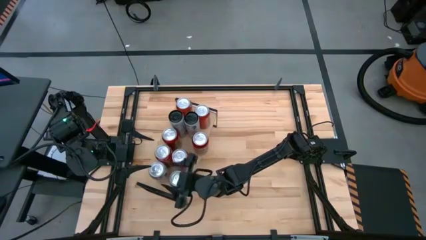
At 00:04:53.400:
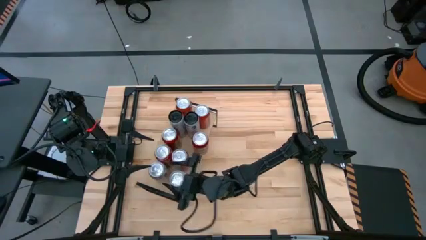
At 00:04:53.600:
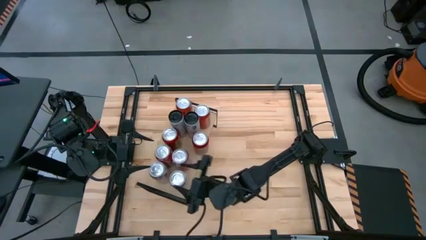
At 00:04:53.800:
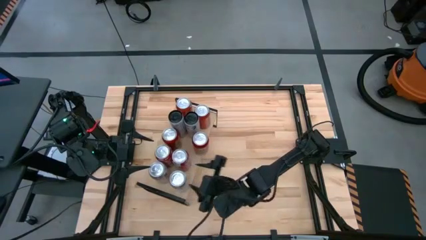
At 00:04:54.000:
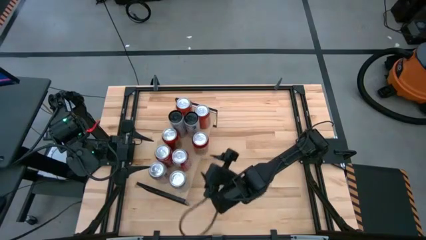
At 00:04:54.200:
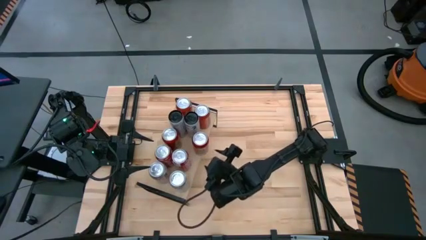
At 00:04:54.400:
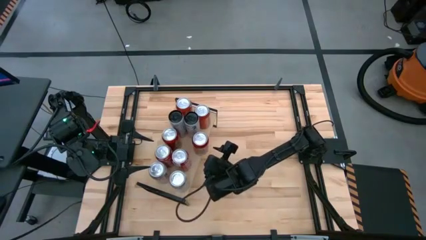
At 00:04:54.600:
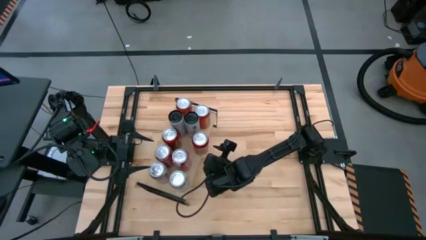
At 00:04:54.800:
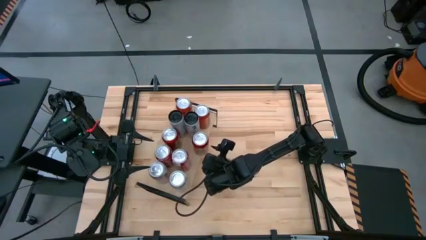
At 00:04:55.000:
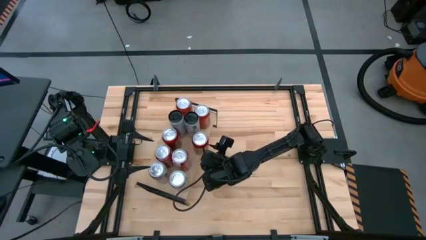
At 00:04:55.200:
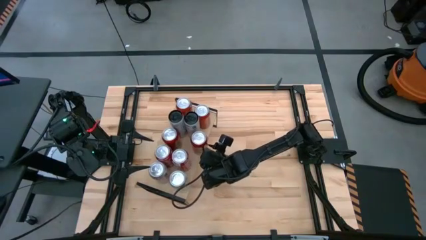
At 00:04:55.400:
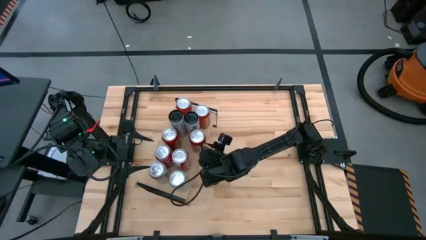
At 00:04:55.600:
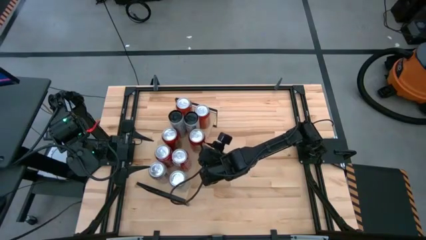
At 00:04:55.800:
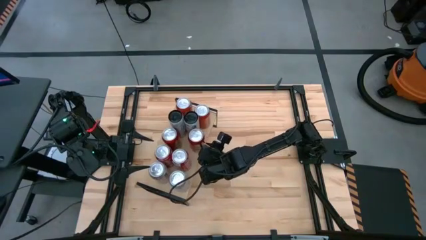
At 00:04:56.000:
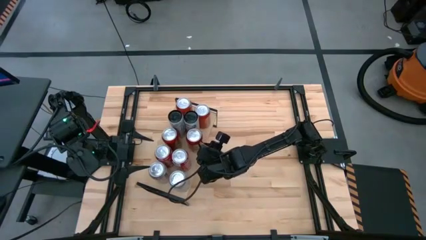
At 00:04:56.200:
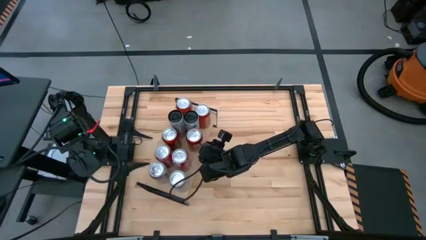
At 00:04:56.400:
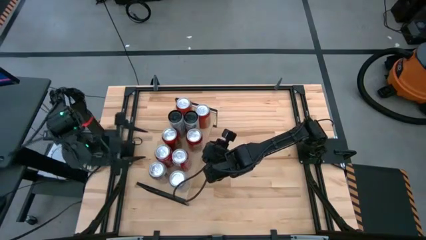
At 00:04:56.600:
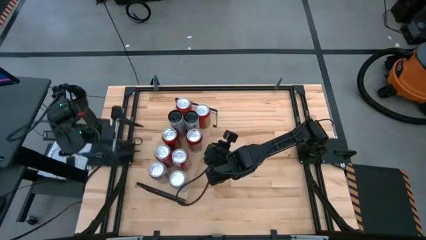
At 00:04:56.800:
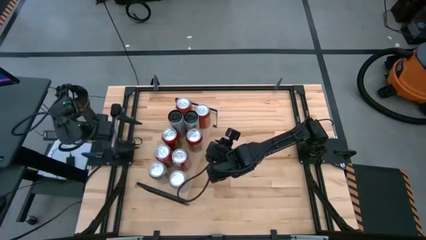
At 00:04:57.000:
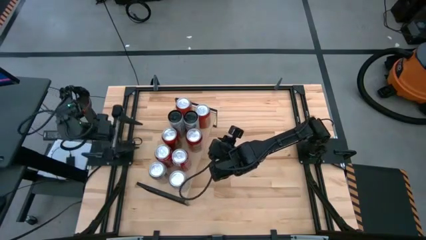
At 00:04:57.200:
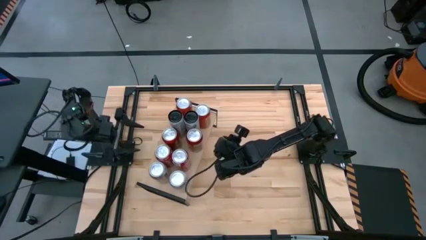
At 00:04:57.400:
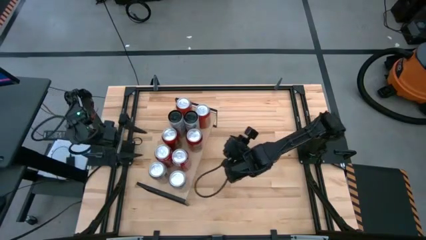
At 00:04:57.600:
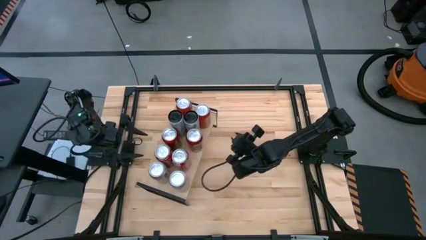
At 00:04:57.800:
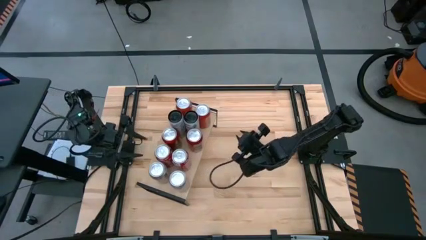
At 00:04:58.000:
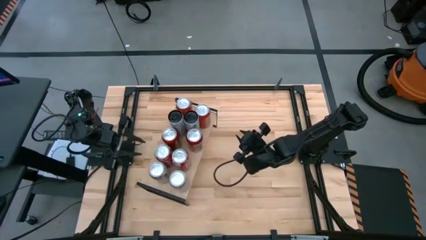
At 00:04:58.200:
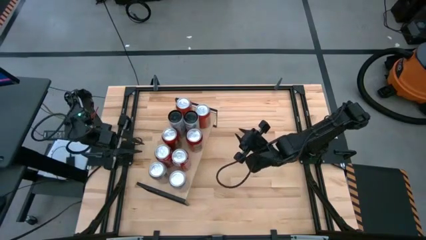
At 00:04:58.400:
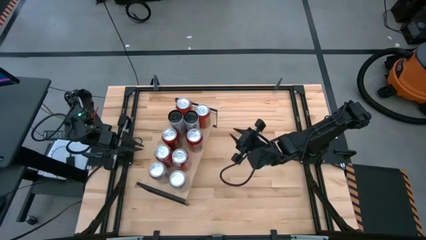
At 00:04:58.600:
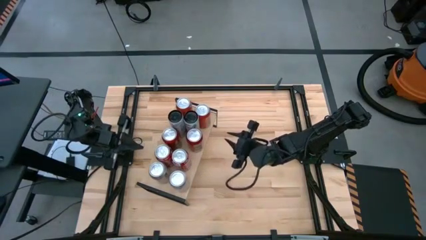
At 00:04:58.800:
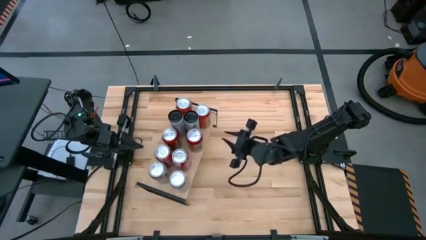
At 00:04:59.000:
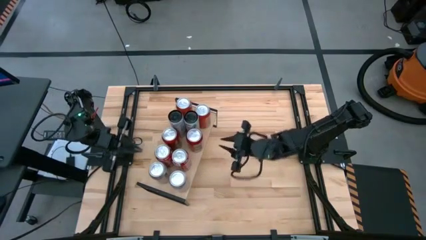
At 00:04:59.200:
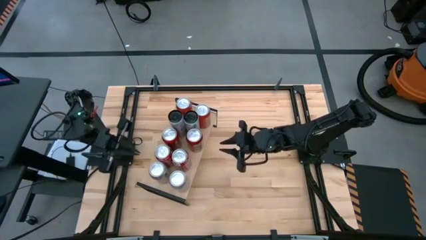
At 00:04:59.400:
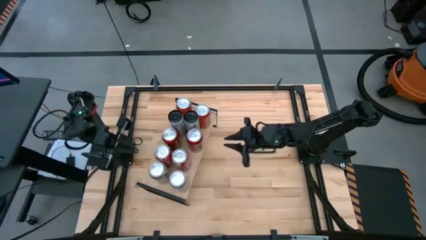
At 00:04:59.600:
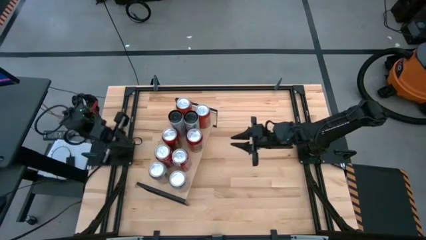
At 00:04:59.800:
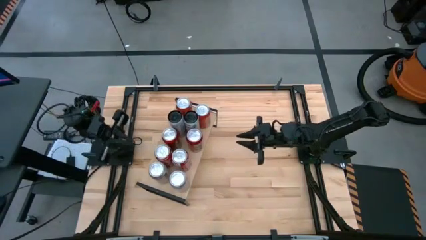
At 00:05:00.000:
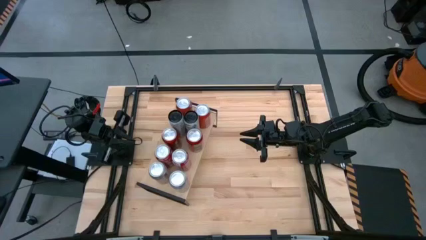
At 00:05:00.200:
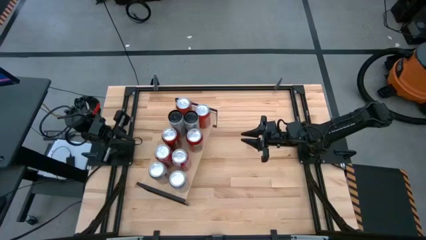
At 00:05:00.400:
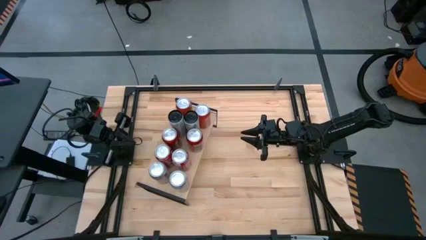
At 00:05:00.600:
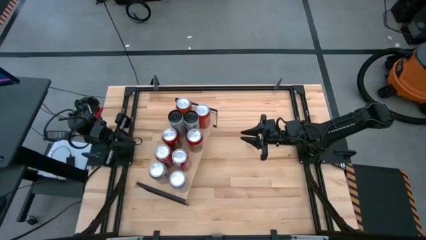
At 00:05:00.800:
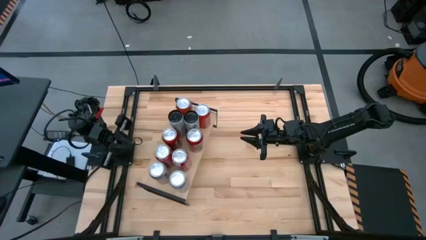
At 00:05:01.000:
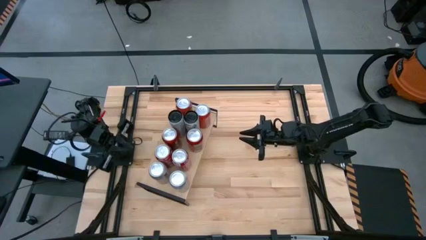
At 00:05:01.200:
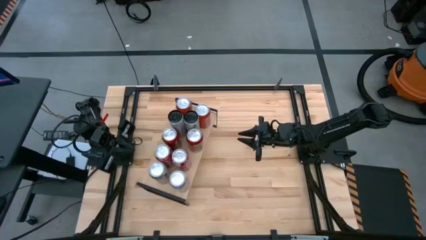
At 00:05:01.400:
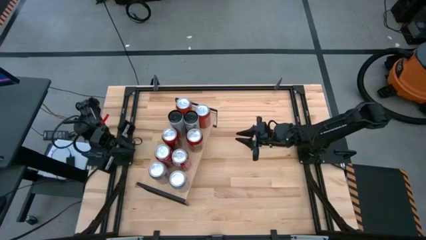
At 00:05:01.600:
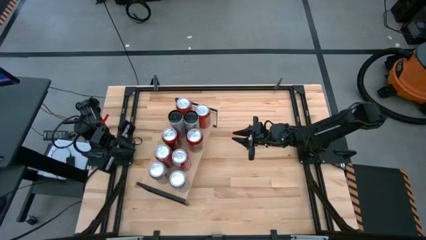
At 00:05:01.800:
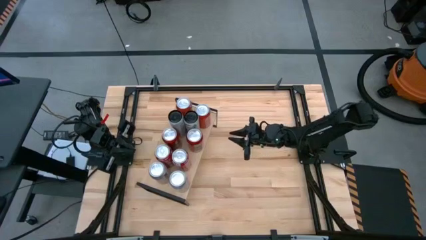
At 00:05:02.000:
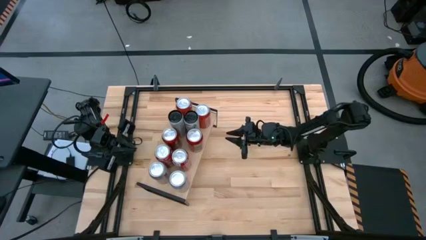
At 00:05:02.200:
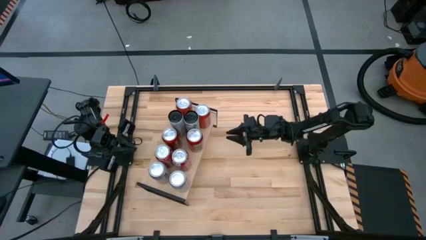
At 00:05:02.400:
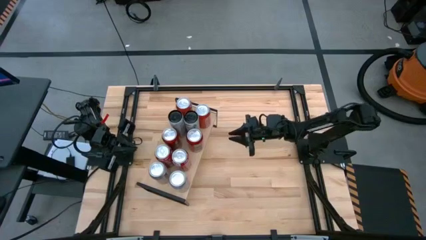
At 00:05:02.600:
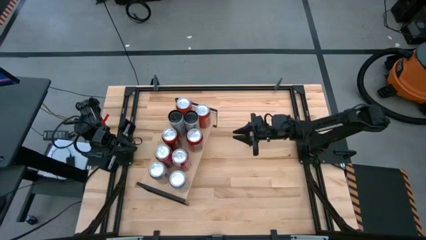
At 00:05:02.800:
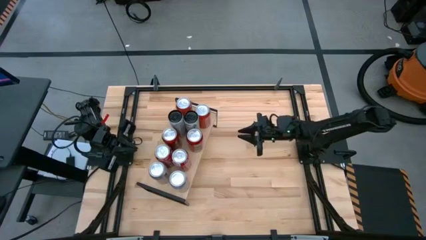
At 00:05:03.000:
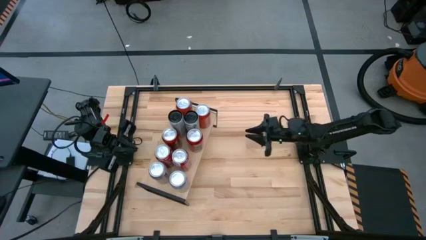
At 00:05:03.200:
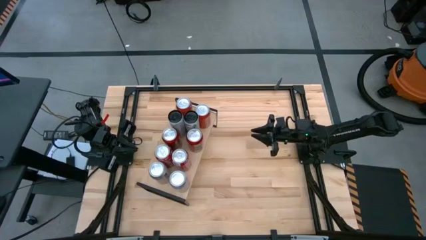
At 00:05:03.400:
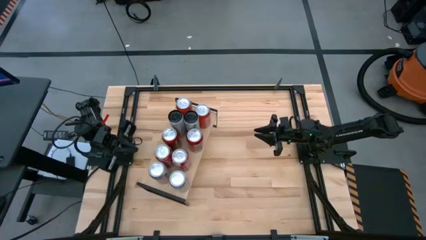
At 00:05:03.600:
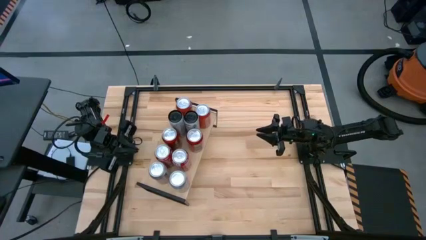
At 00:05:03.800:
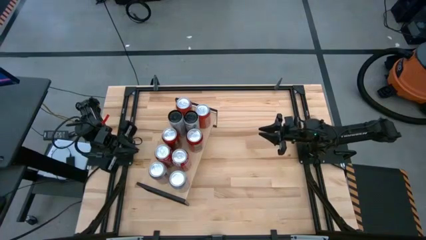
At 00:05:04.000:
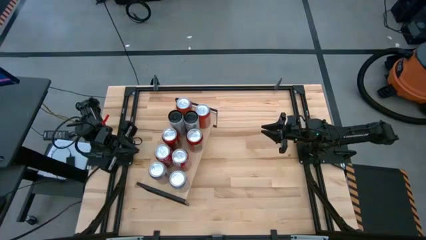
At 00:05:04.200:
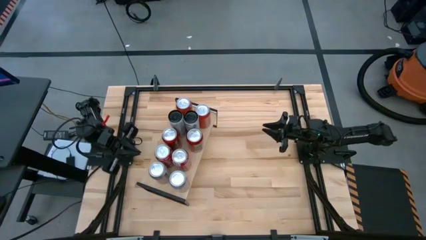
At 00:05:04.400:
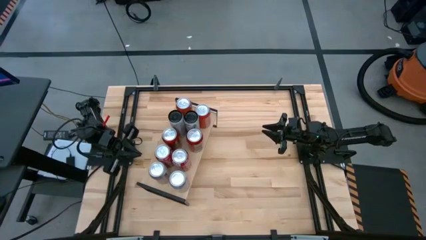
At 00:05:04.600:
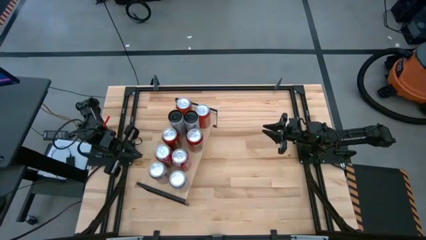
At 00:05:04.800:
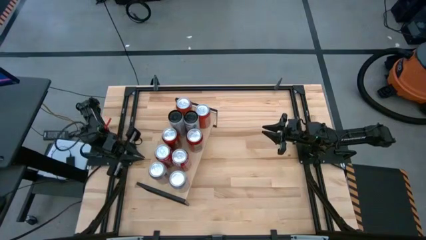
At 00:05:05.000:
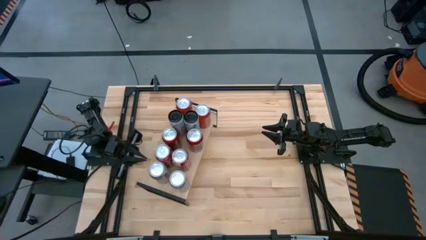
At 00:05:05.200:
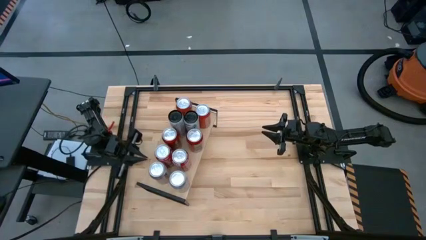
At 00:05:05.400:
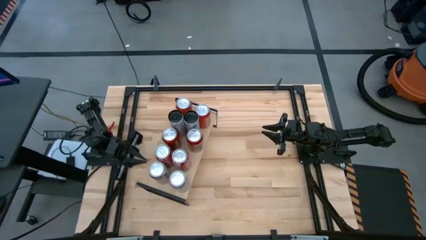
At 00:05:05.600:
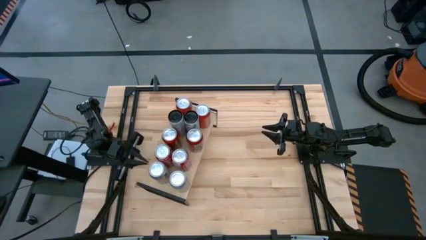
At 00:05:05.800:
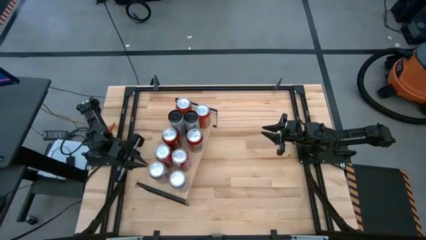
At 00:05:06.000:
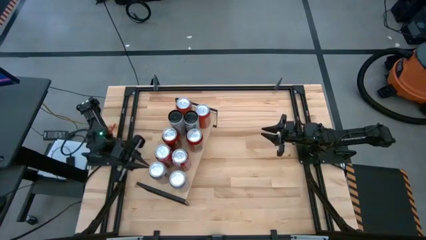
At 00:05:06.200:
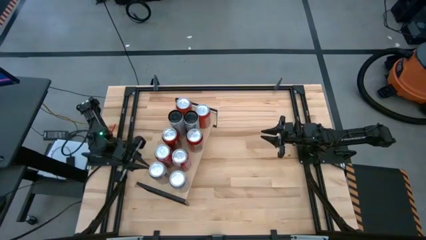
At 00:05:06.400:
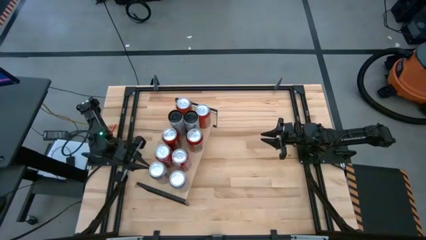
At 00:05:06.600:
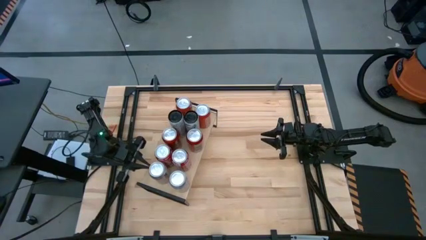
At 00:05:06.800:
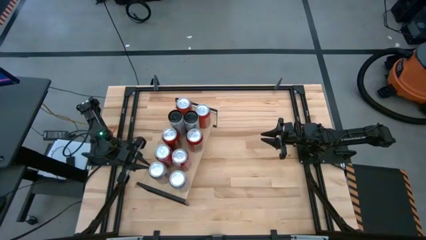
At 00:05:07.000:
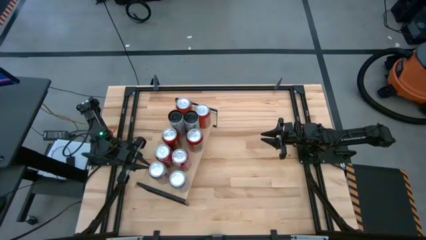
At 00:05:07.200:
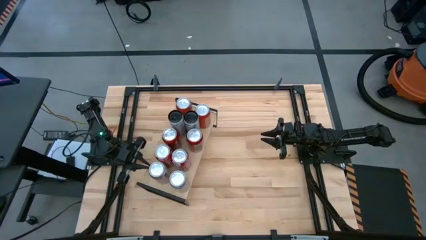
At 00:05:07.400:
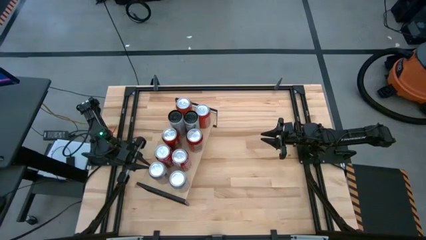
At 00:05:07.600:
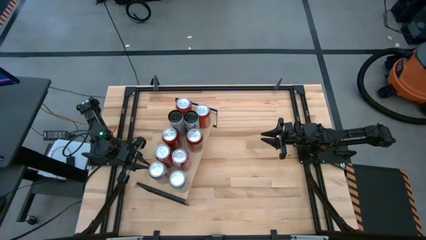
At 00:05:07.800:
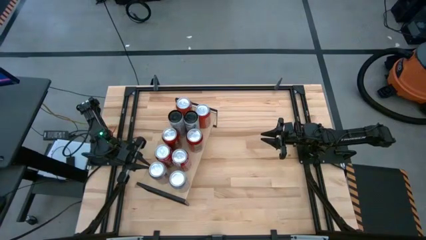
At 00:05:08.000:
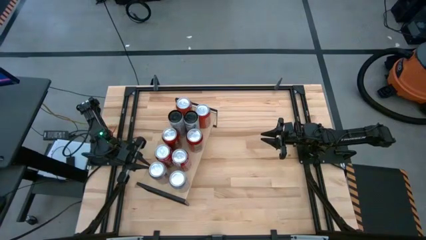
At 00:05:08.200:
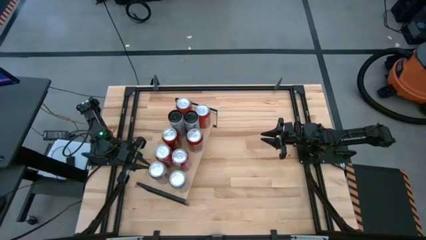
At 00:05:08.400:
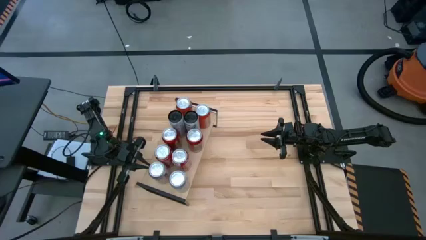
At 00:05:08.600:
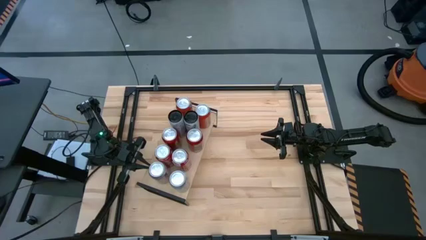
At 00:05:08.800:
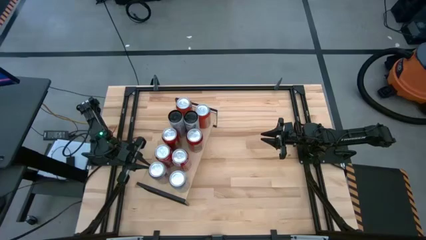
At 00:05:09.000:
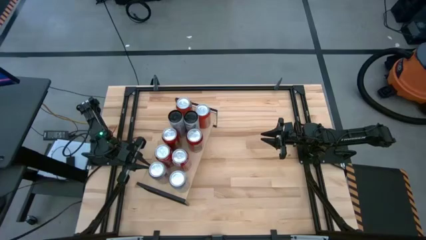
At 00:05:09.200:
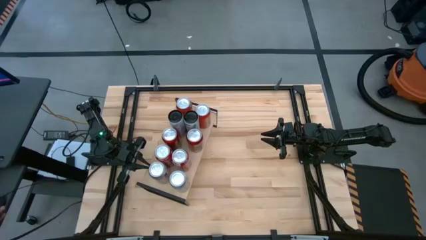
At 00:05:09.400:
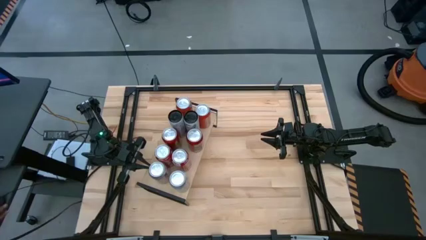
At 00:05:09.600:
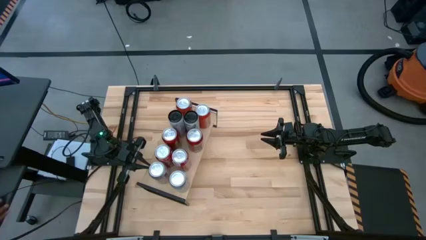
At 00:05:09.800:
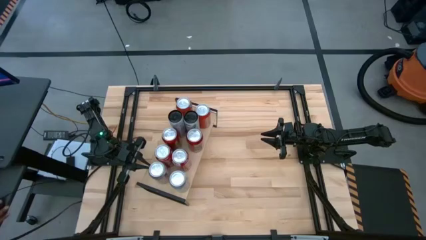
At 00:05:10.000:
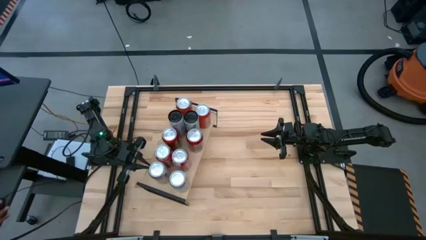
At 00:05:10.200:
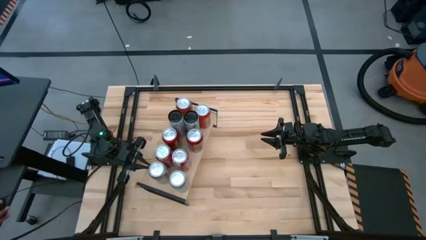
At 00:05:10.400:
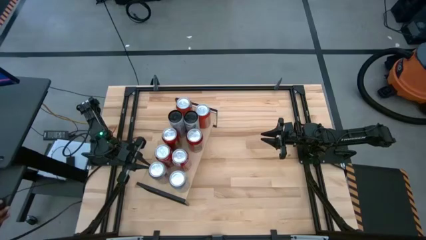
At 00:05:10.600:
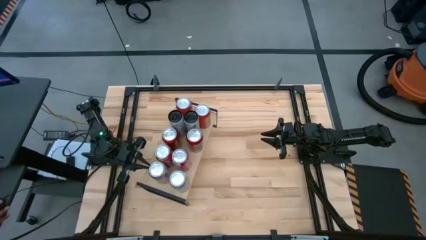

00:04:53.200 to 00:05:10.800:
Task: Place canned beverage on shelf
Return to Home Position
